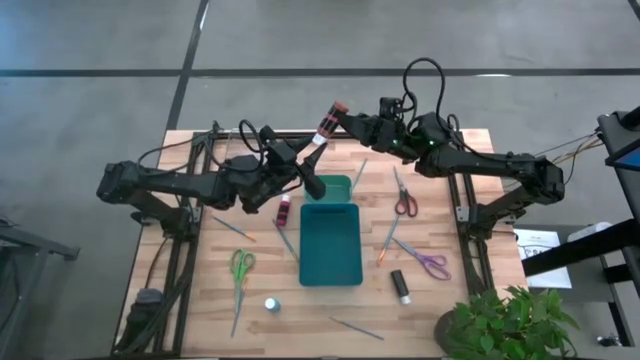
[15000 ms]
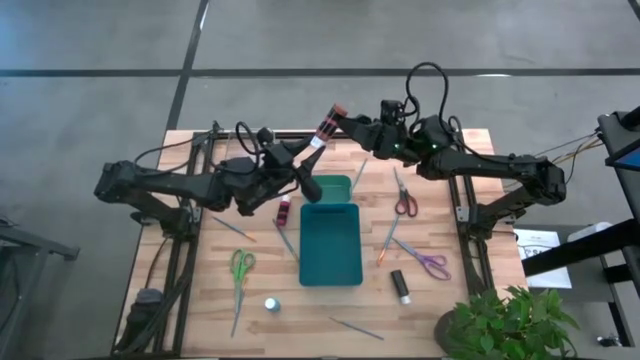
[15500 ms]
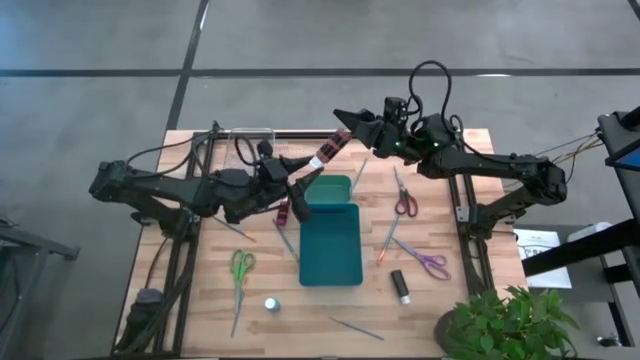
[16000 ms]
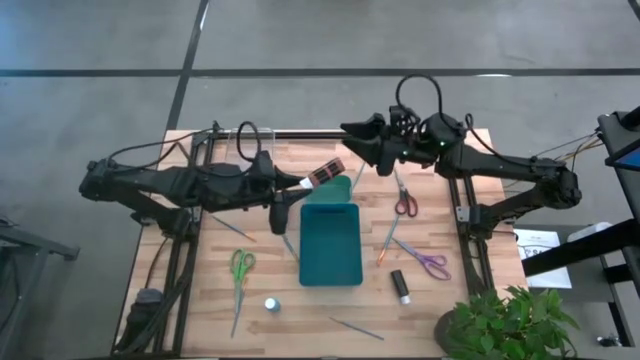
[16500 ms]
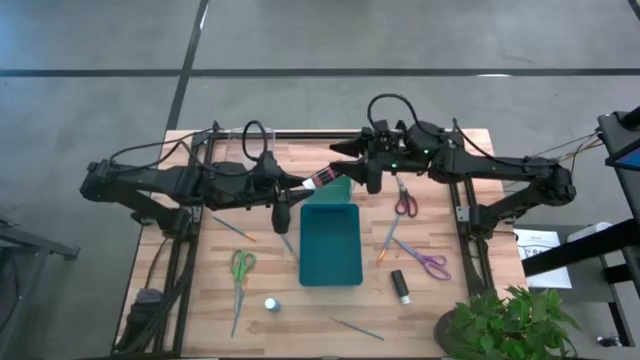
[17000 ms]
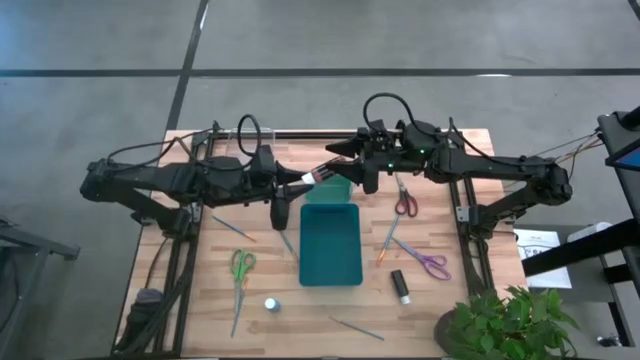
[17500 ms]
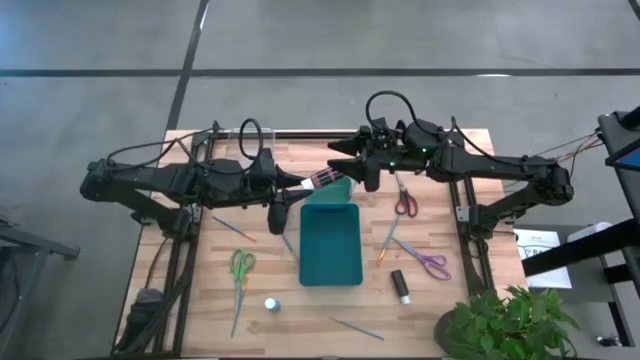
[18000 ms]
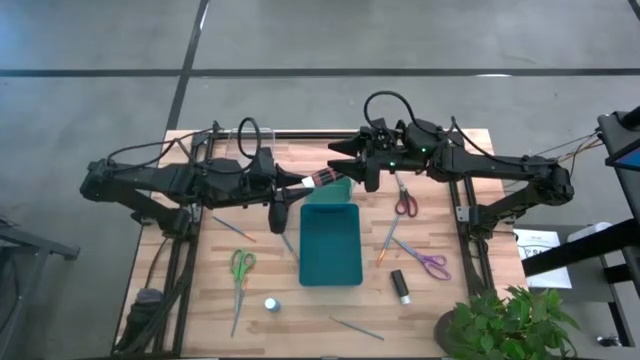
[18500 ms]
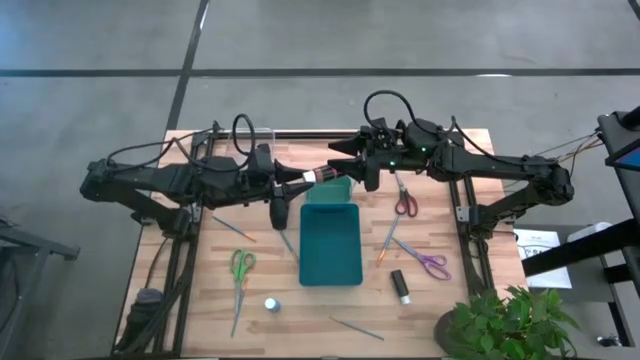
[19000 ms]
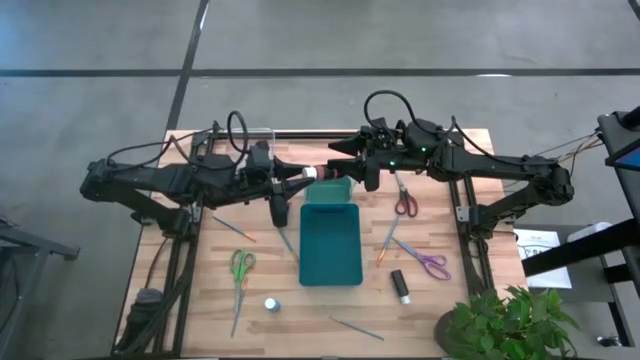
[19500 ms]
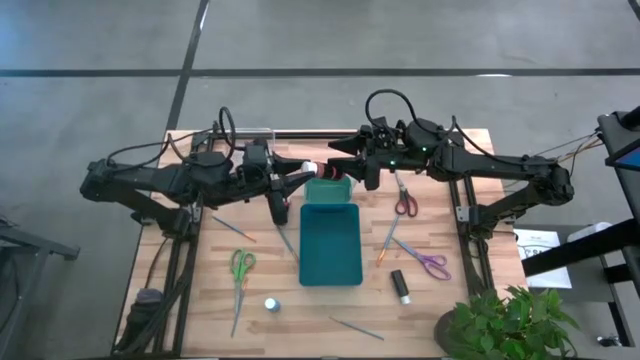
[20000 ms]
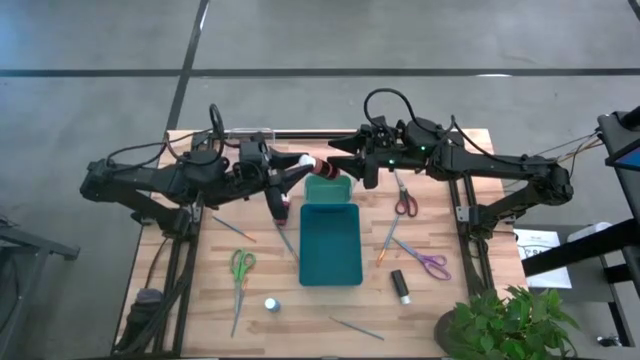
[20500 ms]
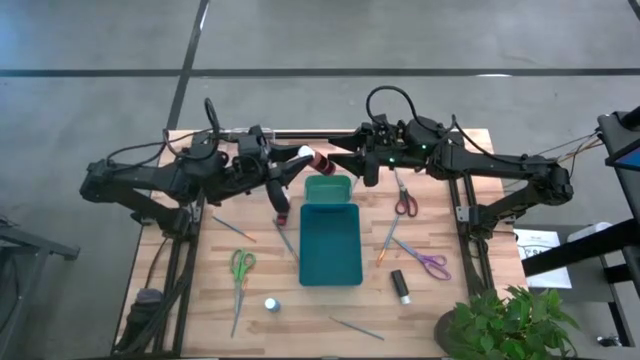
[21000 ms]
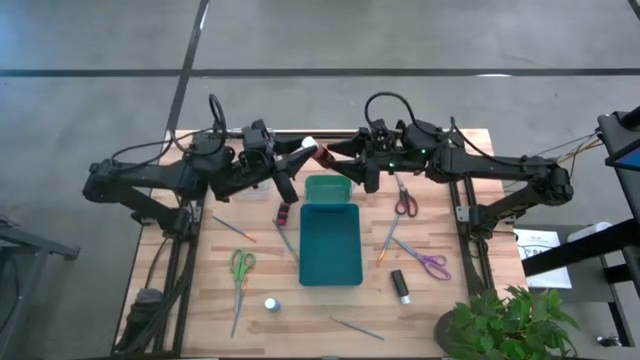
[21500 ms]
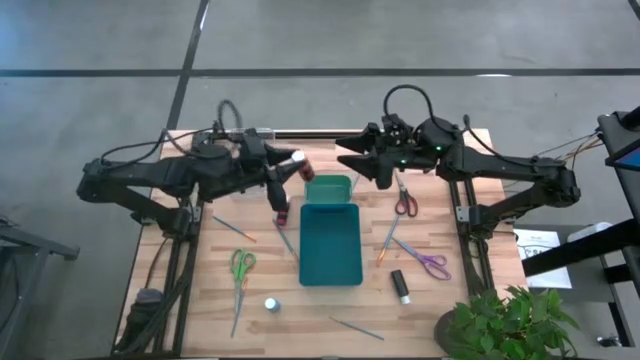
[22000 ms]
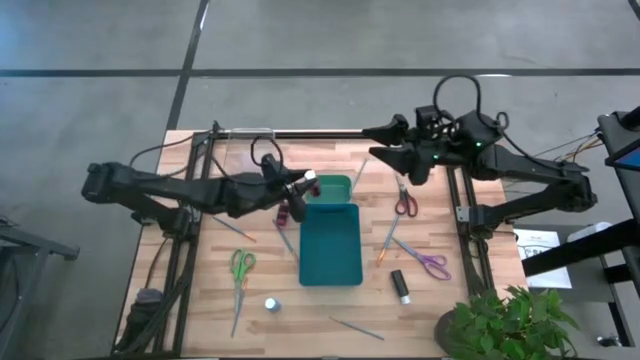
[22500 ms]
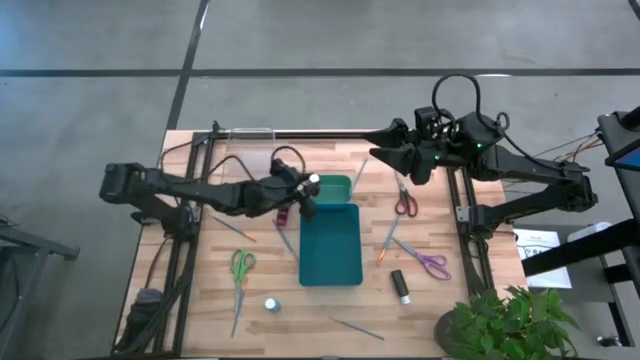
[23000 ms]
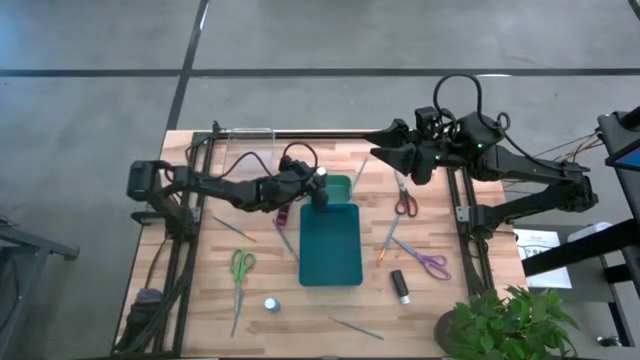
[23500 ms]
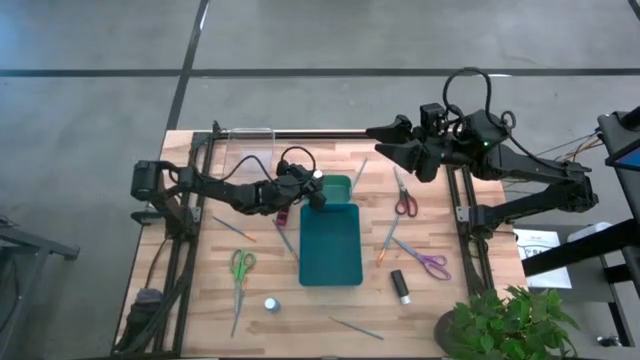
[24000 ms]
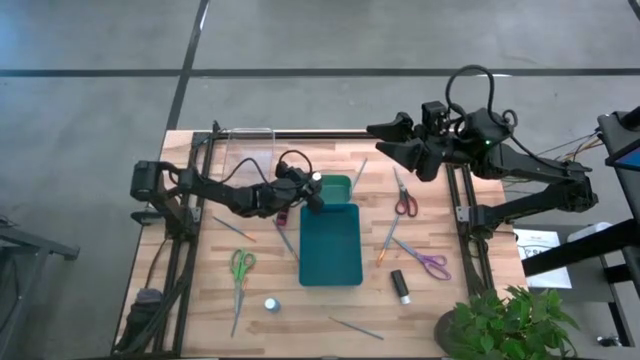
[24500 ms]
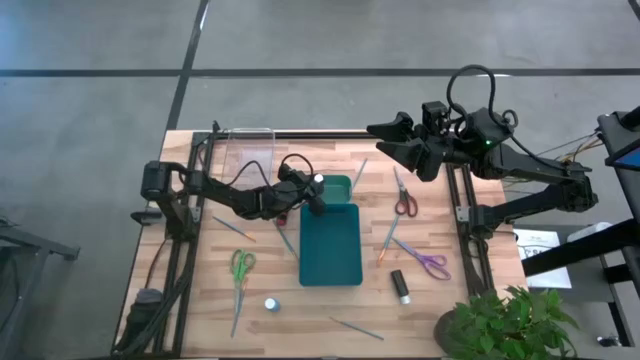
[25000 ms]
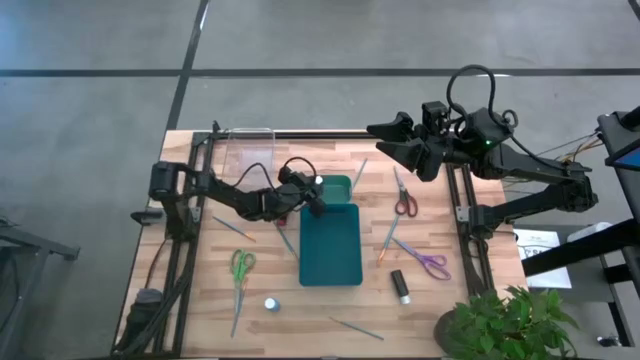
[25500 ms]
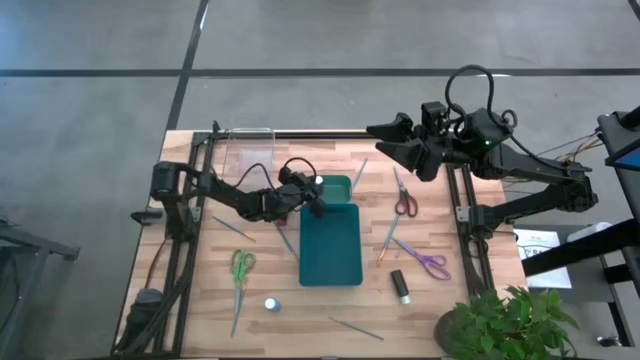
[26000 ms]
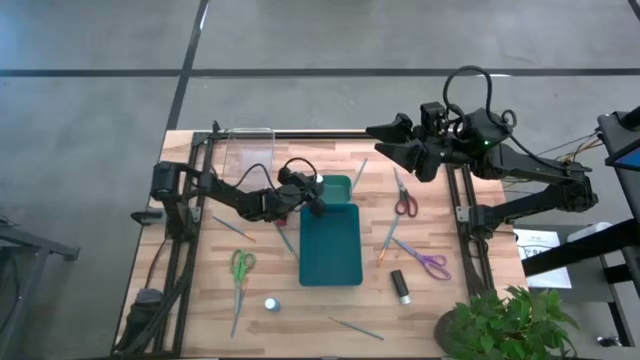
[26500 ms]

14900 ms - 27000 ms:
Task: Pick & Place Paint Supplies
Put the orange paint bottle into the green bin

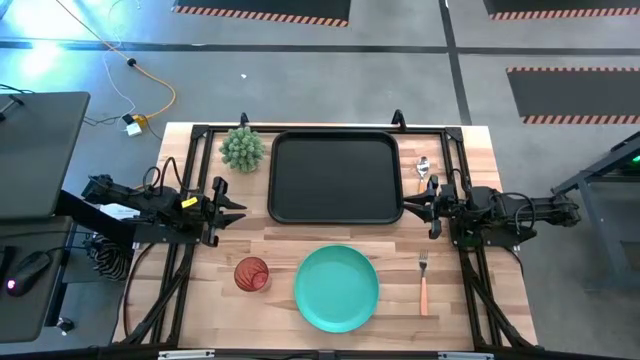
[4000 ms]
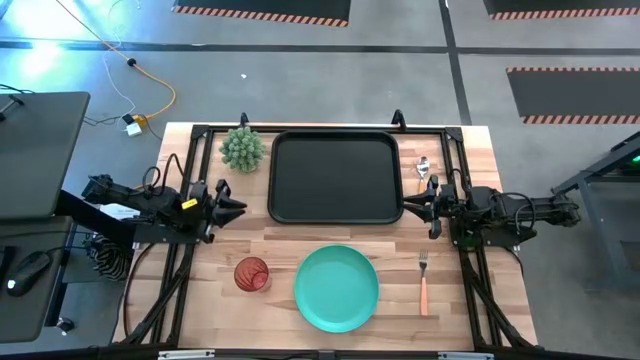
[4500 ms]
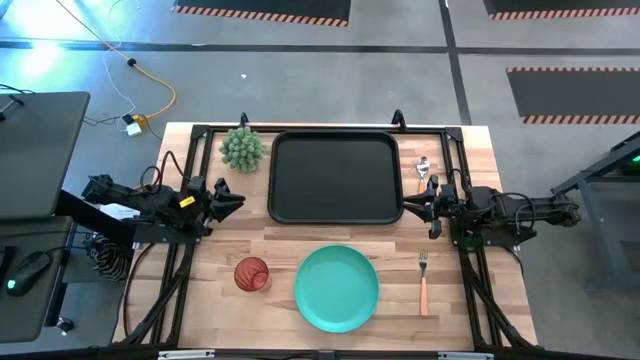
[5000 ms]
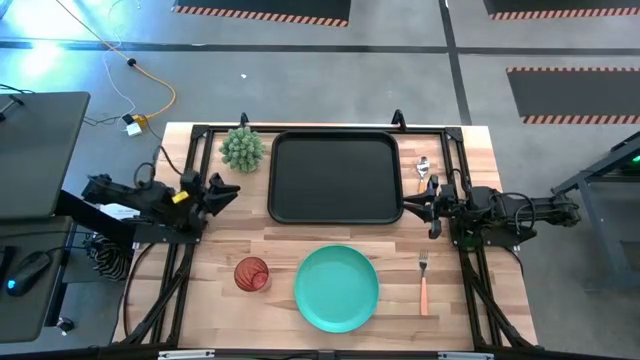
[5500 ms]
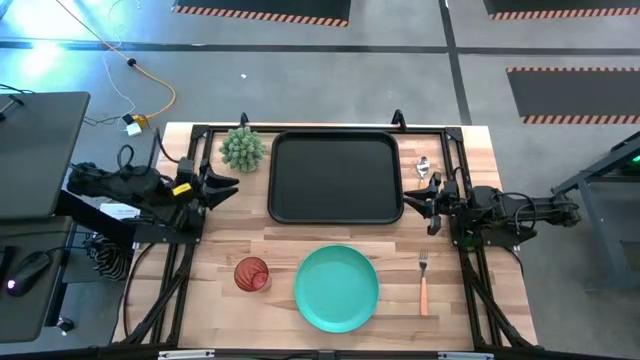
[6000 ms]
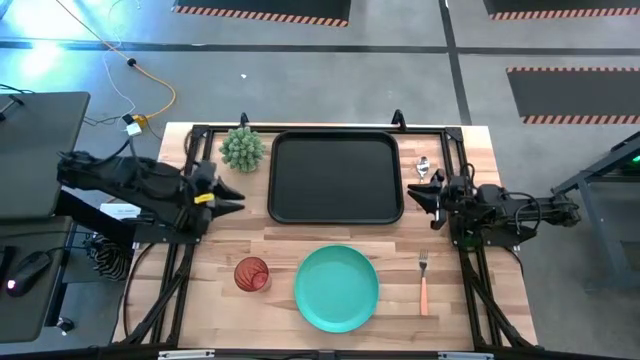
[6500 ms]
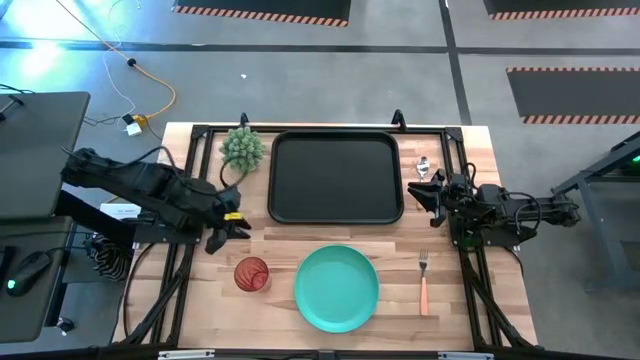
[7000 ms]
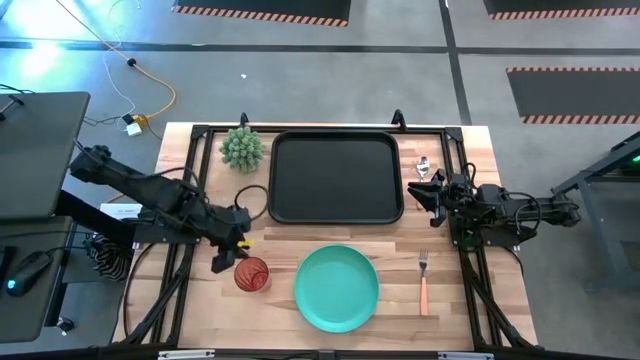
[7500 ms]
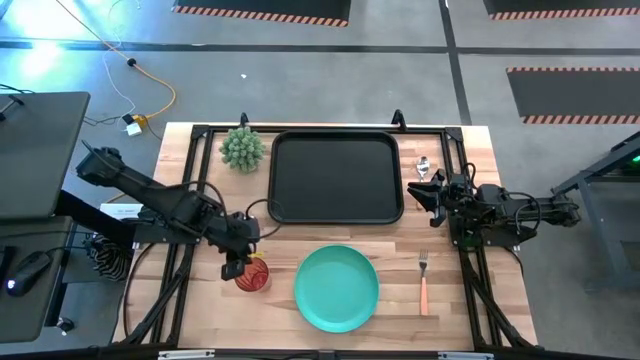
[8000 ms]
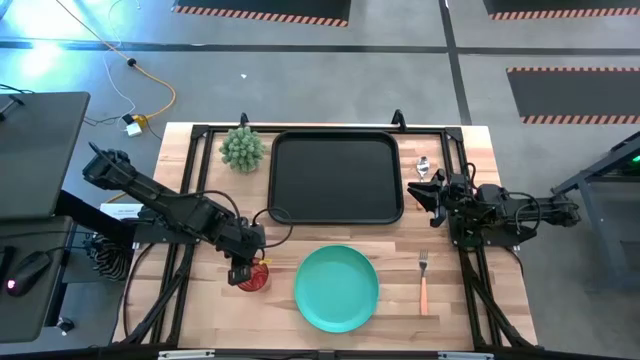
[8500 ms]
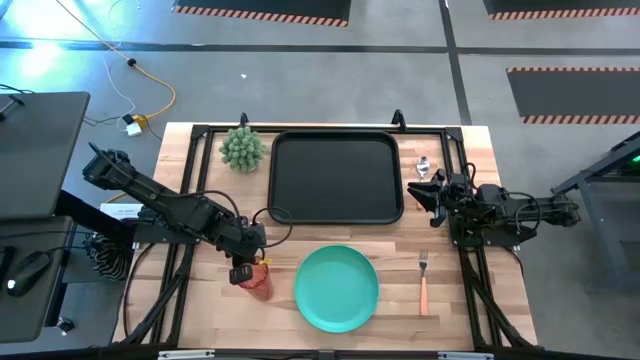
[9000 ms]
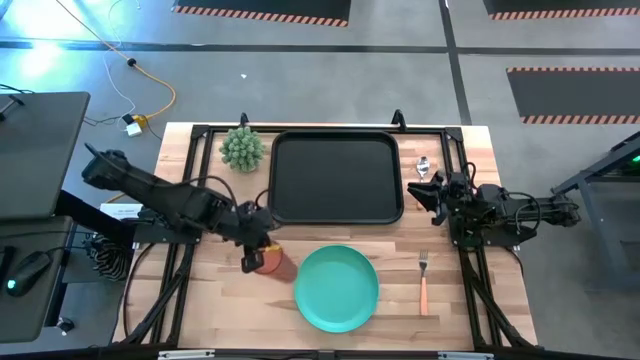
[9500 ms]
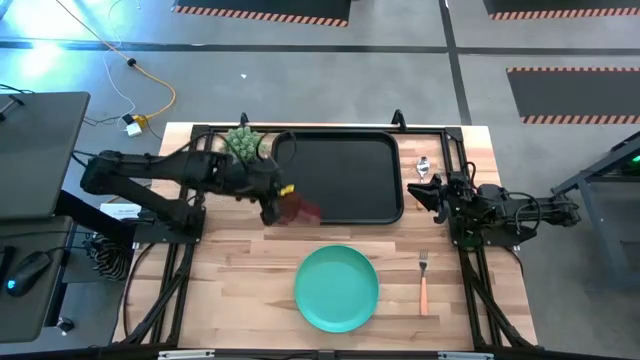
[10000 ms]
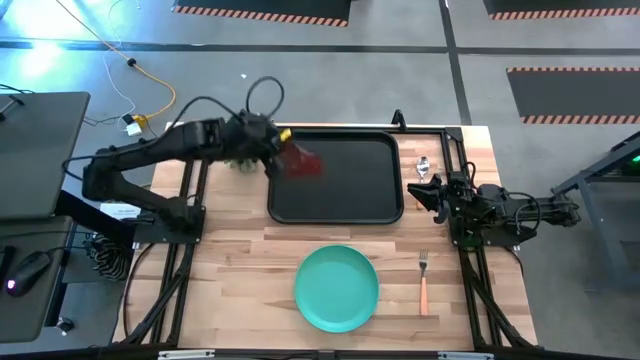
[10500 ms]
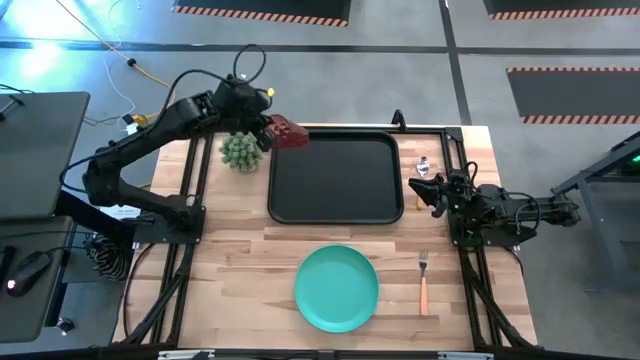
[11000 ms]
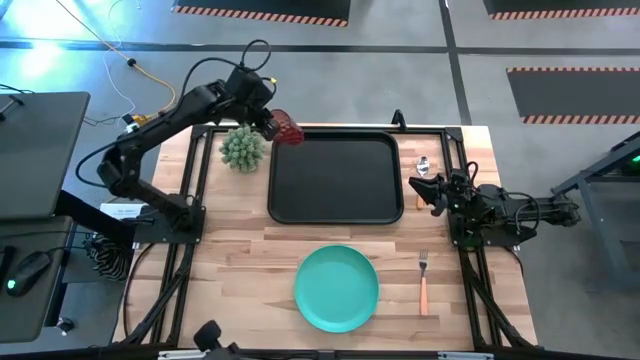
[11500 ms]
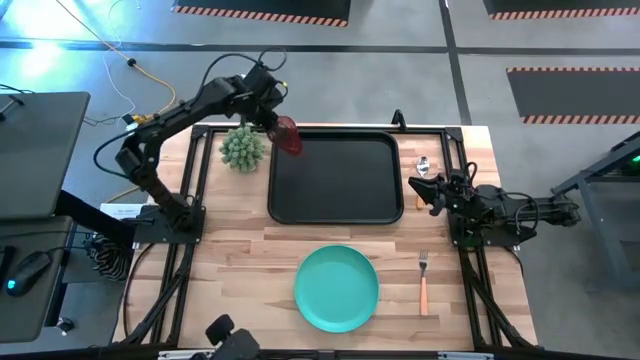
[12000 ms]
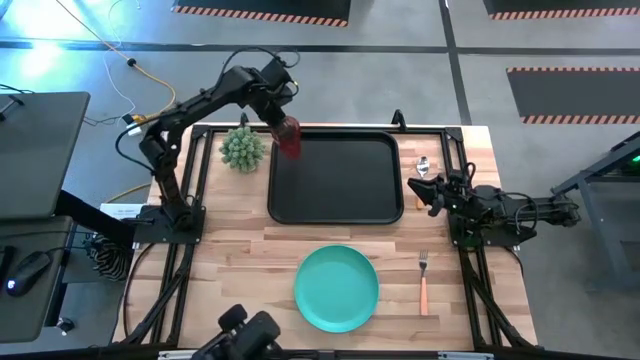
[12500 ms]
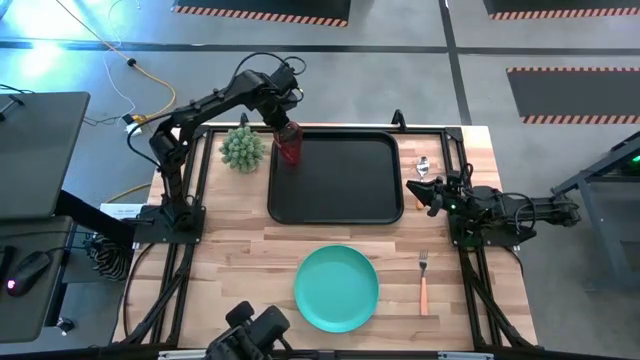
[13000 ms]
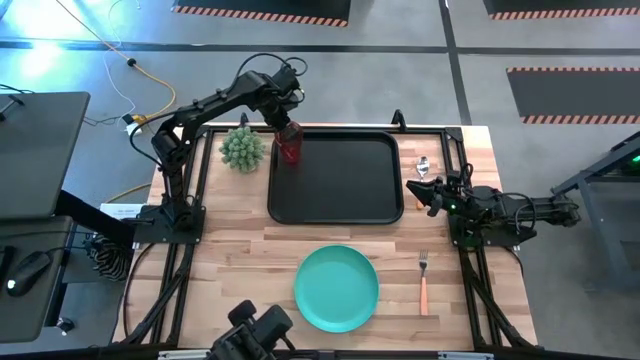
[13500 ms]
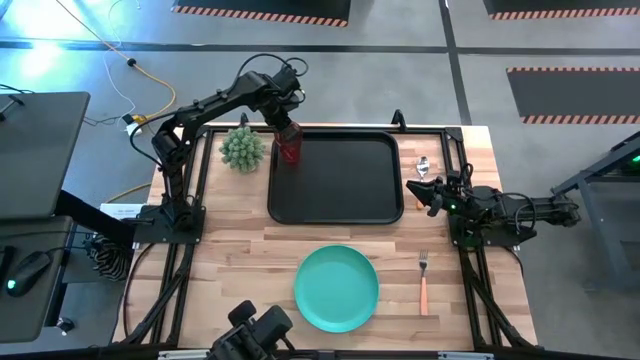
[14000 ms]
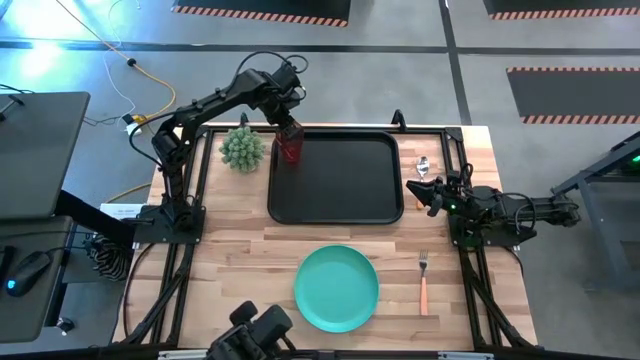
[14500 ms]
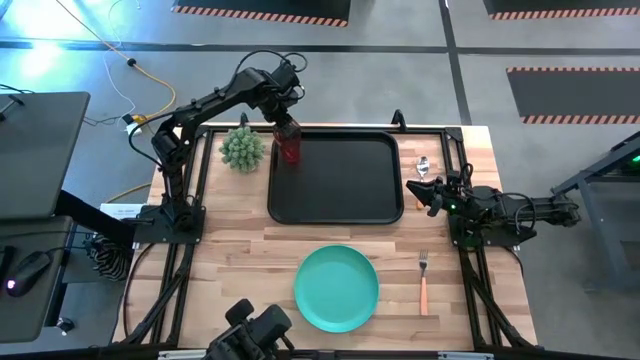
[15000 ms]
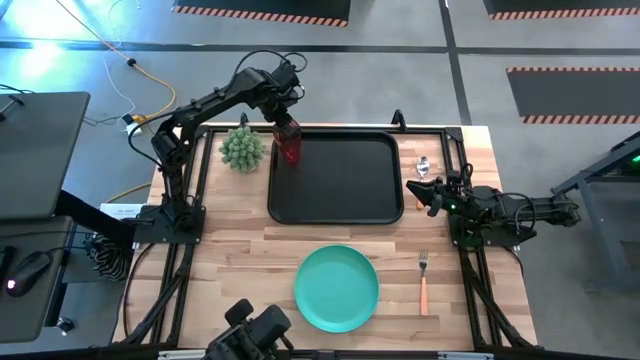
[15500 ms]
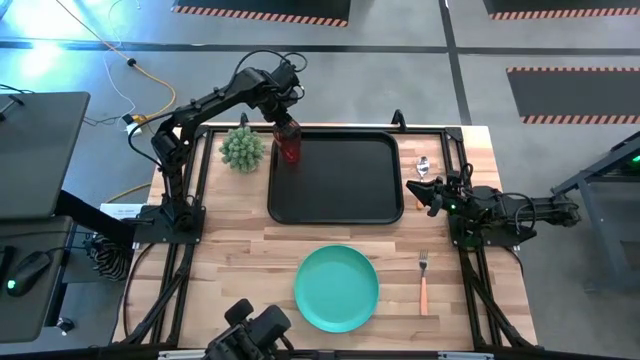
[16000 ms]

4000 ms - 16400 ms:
Task: Pick and place plate/cup/fork/spoon on tray
Put the red cup on the black tray
